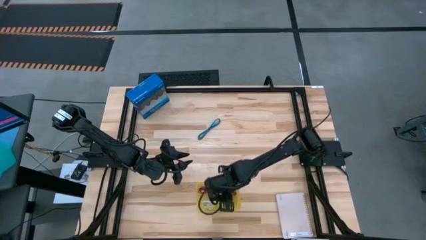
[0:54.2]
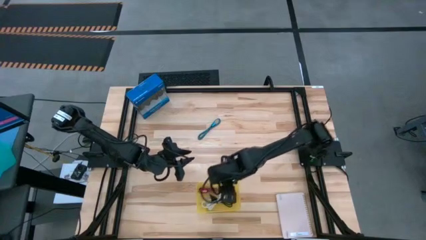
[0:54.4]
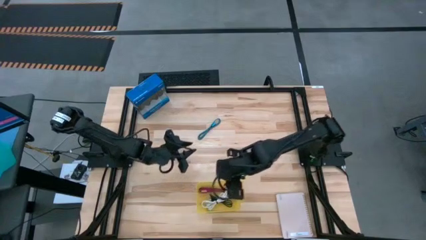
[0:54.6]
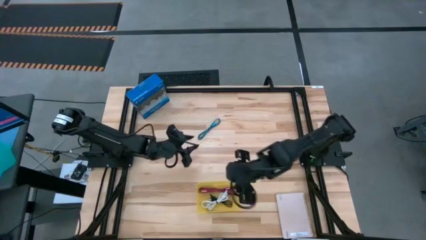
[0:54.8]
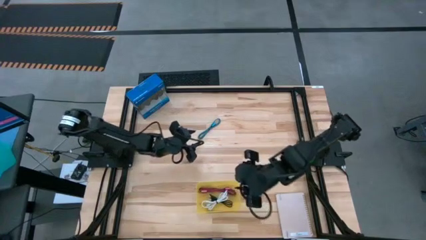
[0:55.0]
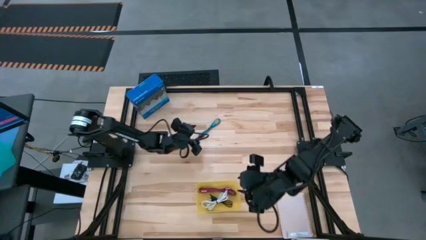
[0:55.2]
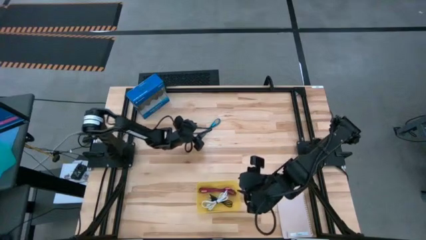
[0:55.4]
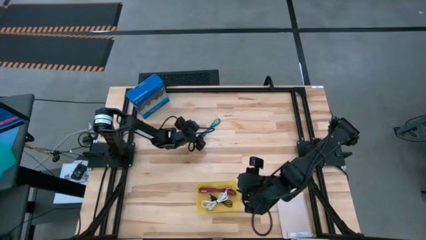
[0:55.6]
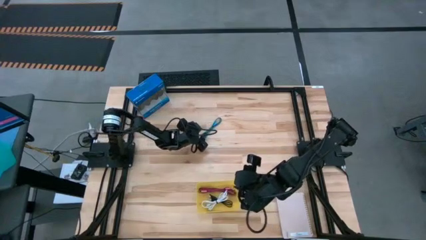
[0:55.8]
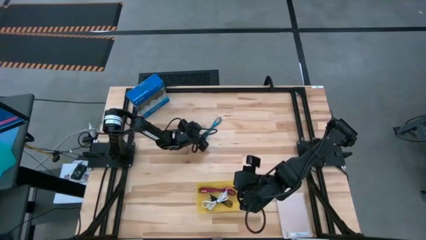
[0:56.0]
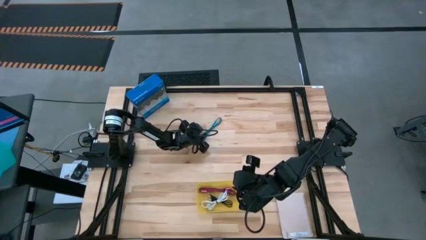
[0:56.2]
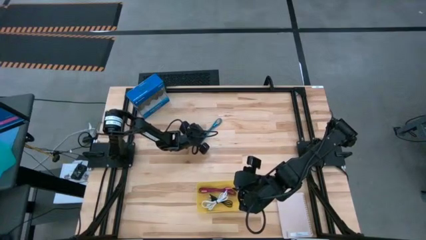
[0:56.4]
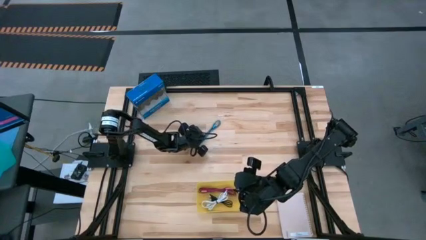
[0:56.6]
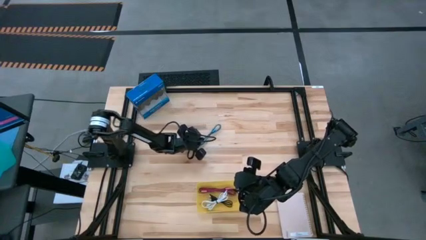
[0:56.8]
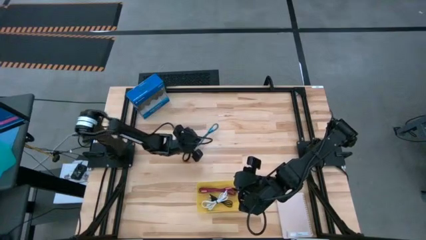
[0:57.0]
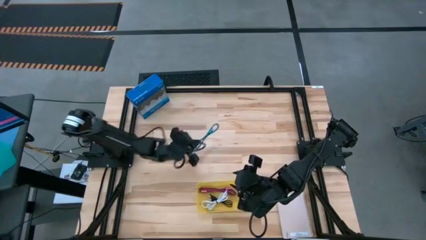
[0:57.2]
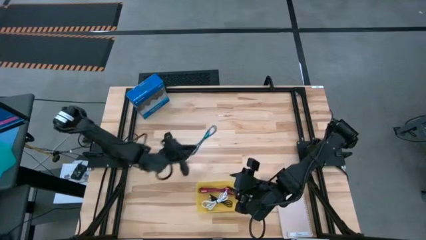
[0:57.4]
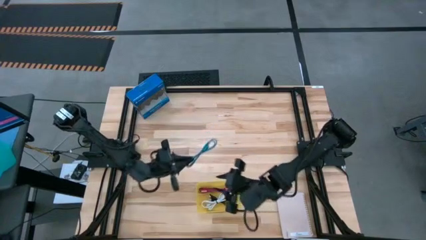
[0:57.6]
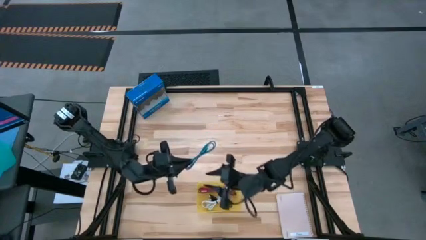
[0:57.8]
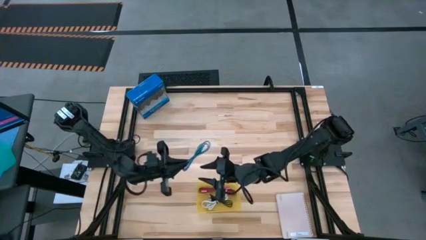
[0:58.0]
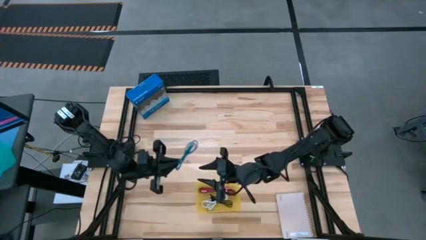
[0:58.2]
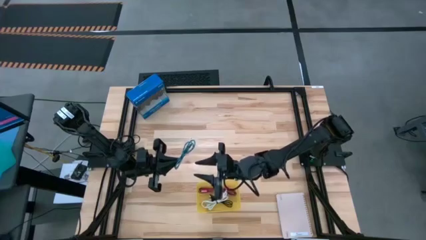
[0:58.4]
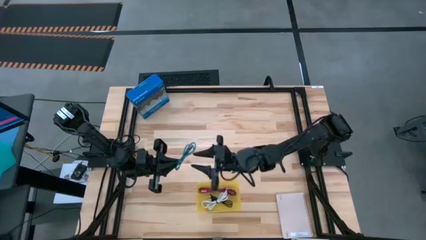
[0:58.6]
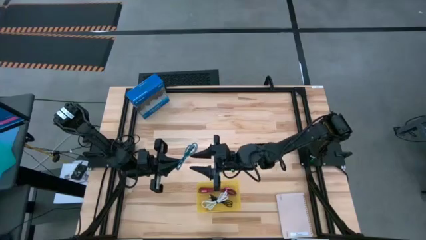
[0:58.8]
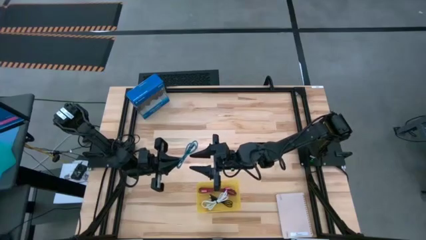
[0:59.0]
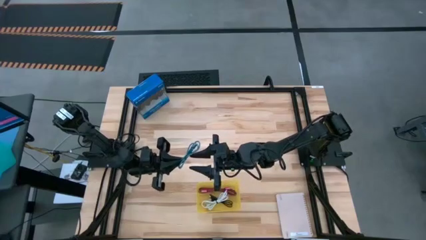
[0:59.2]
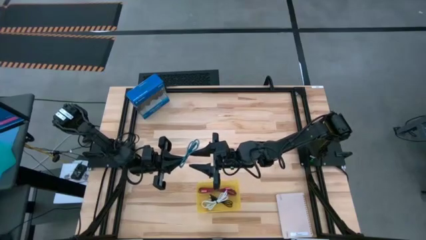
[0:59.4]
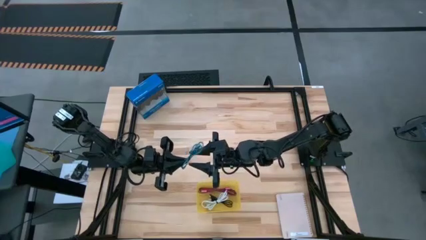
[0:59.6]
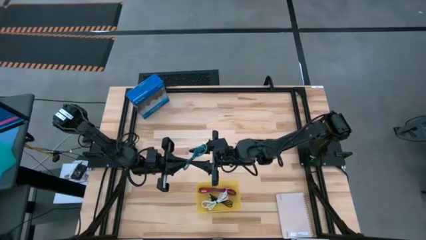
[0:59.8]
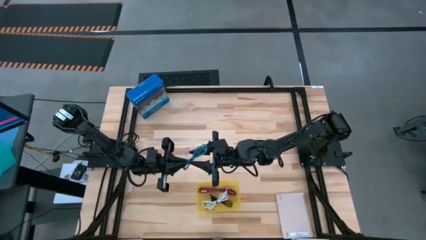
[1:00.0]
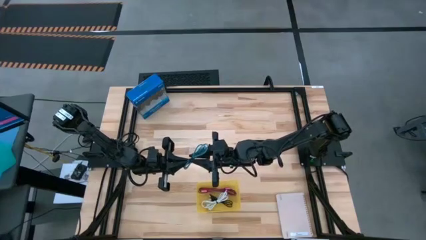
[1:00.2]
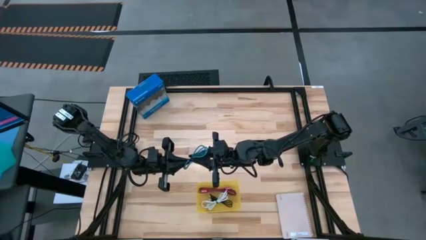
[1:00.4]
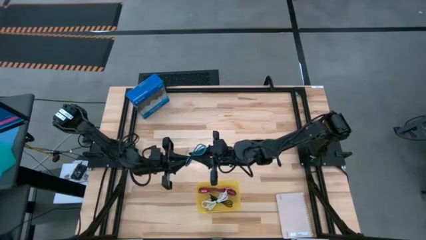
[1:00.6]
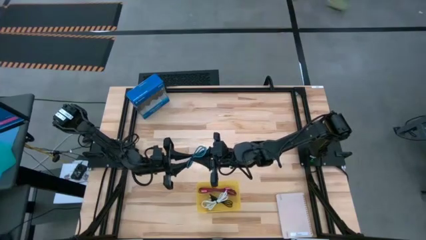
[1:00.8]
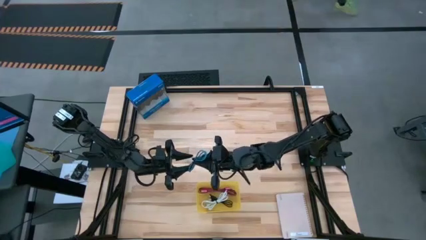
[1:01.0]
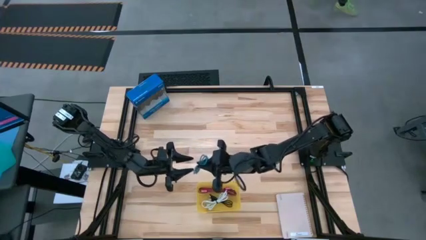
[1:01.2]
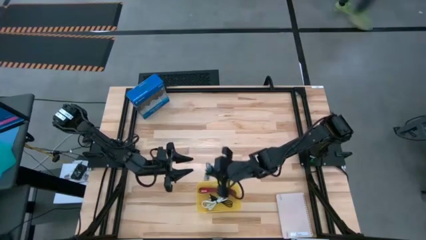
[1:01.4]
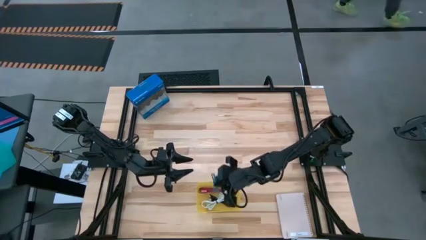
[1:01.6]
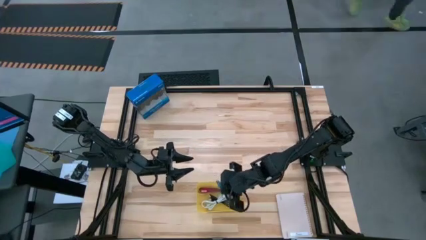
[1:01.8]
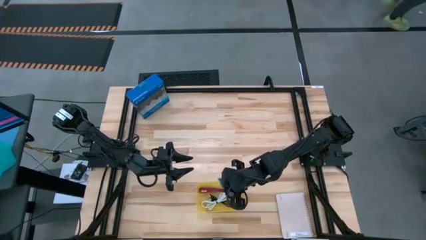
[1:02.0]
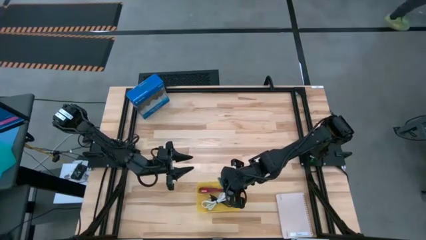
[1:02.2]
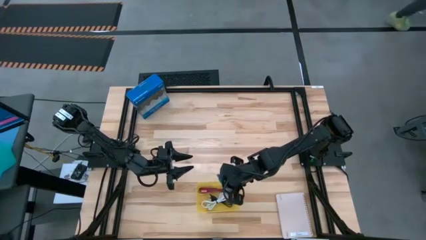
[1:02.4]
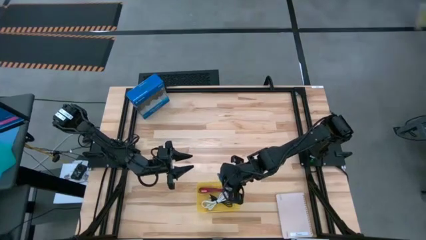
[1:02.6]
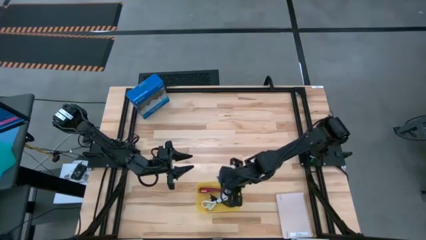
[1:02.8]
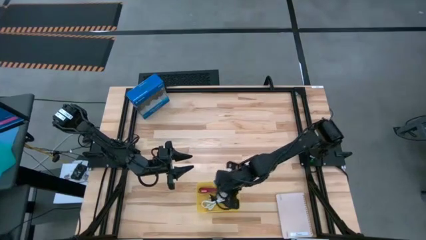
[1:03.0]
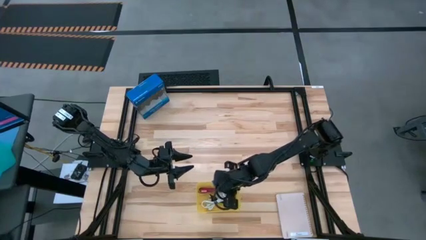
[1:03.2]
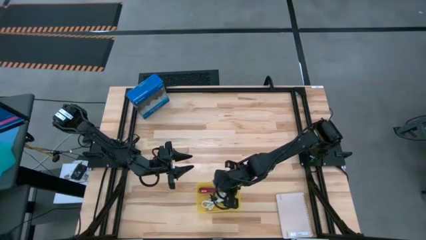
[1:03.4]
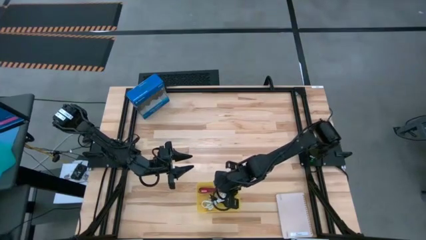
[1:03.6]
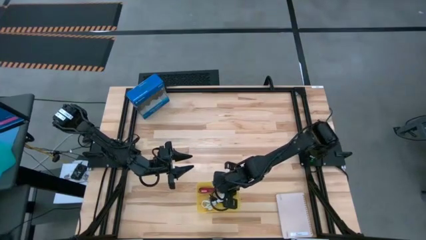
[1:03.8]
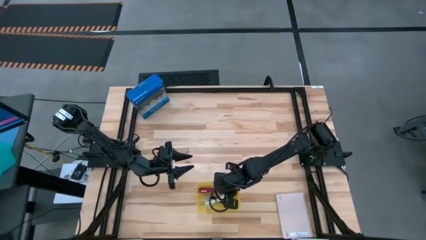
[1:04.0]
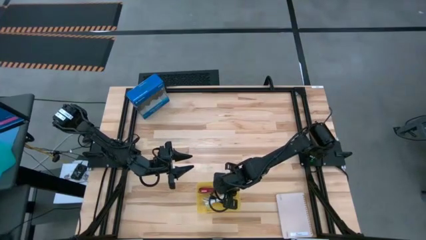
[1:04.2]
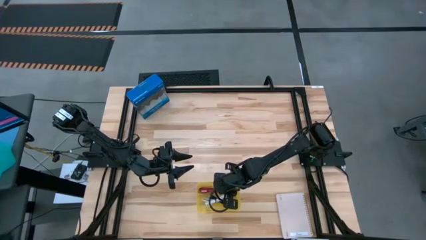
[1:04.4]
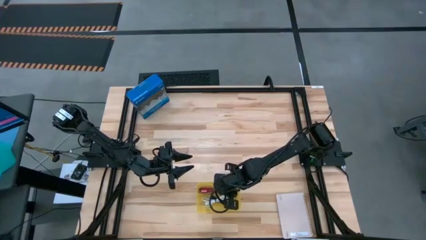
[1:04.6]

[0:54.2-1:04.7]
Task: Pick and place USB-C Cables
Put the blue charger cable into the yellow bin

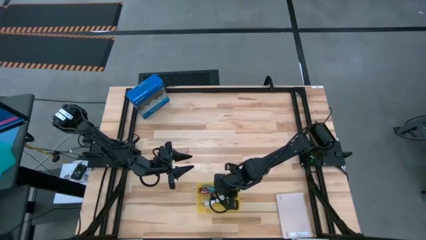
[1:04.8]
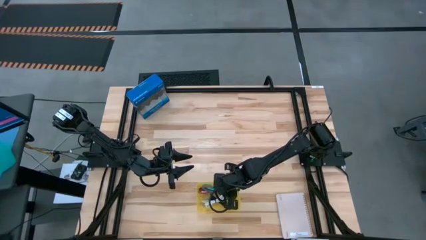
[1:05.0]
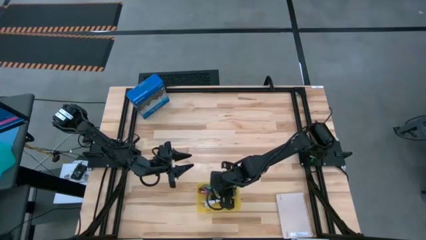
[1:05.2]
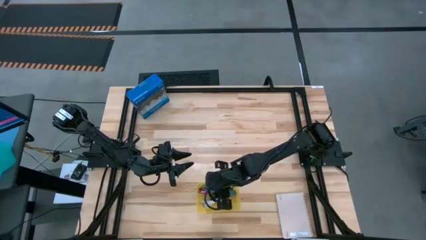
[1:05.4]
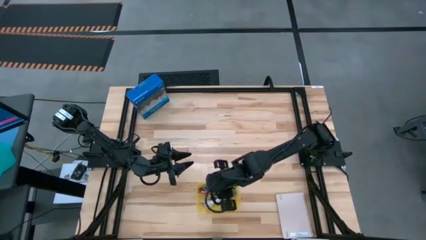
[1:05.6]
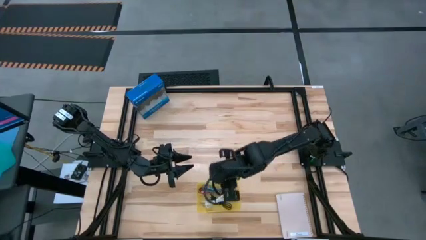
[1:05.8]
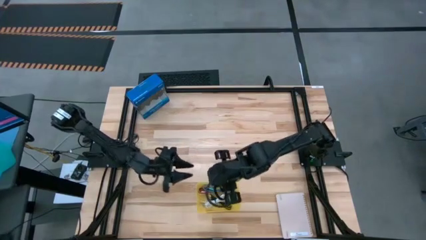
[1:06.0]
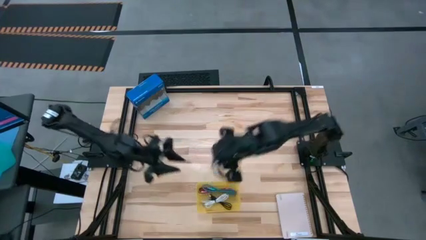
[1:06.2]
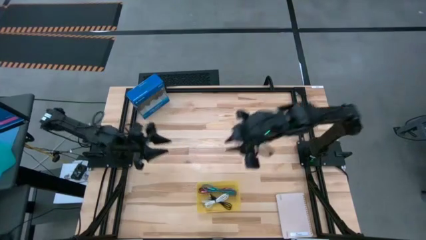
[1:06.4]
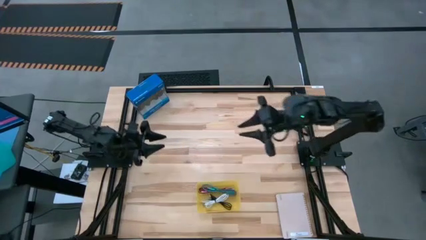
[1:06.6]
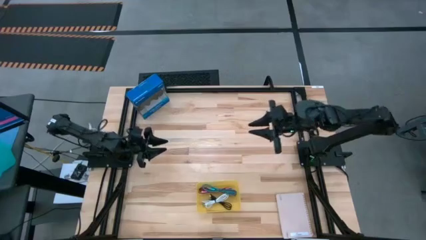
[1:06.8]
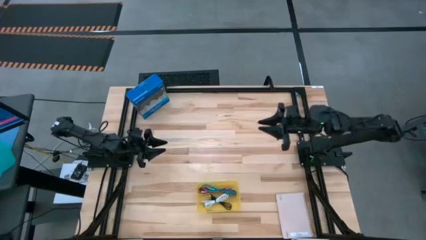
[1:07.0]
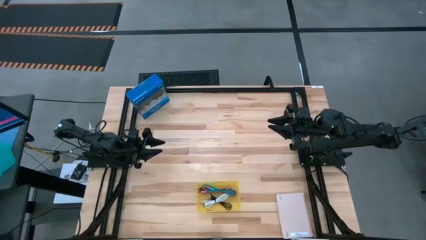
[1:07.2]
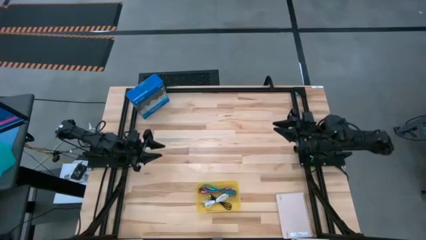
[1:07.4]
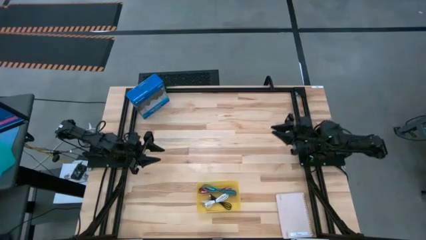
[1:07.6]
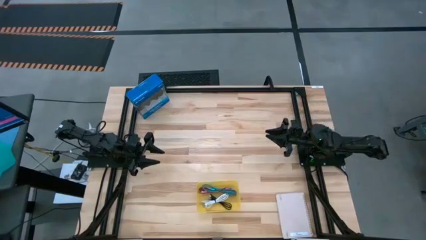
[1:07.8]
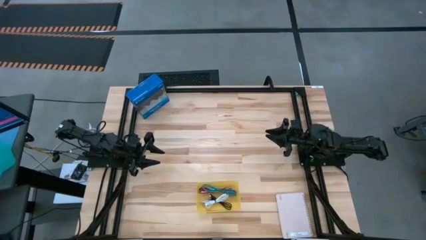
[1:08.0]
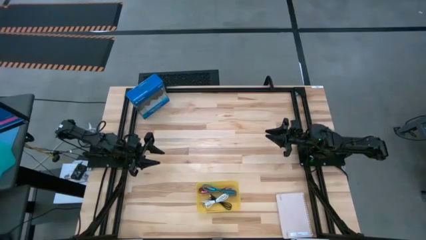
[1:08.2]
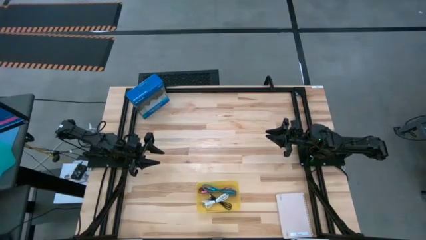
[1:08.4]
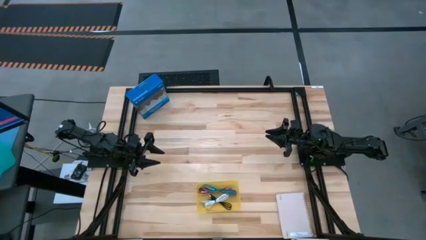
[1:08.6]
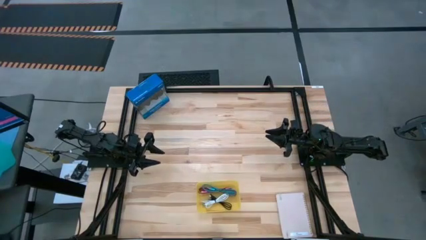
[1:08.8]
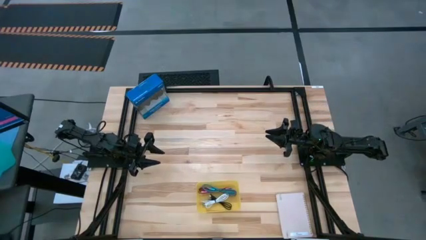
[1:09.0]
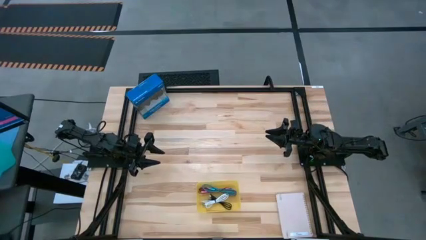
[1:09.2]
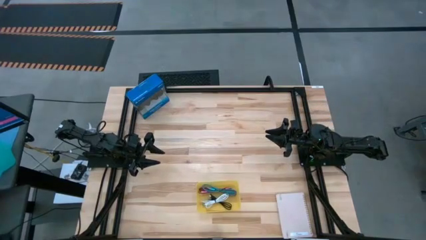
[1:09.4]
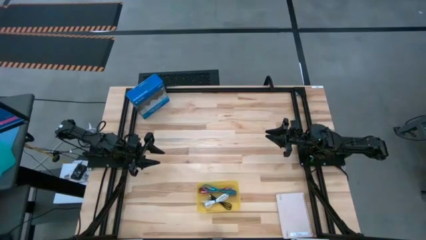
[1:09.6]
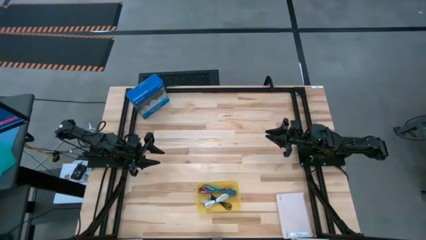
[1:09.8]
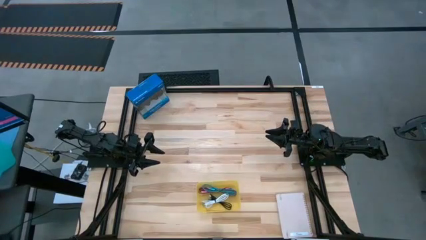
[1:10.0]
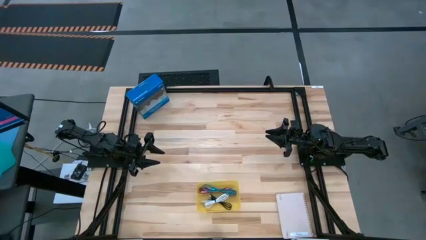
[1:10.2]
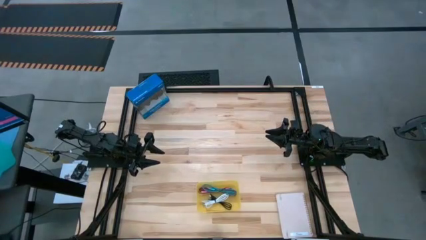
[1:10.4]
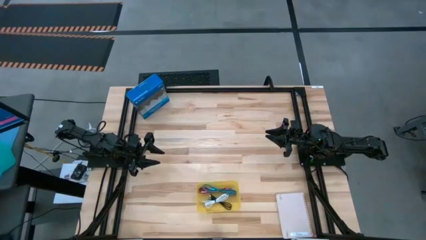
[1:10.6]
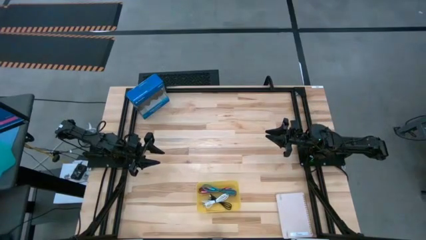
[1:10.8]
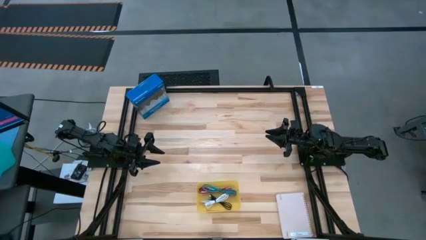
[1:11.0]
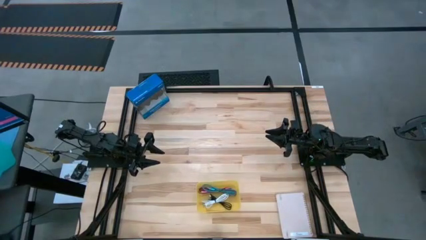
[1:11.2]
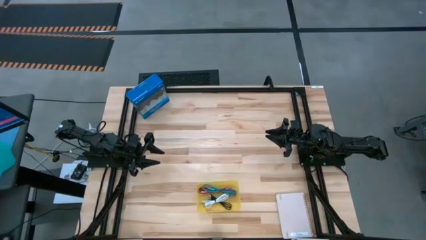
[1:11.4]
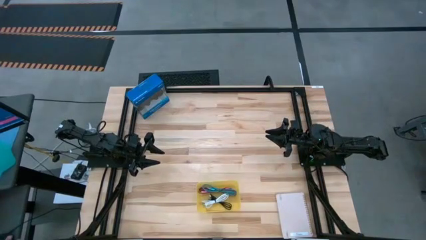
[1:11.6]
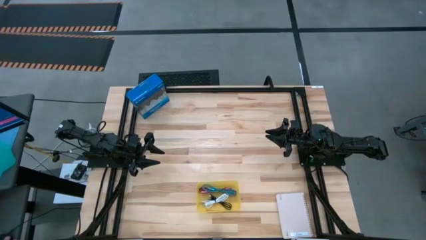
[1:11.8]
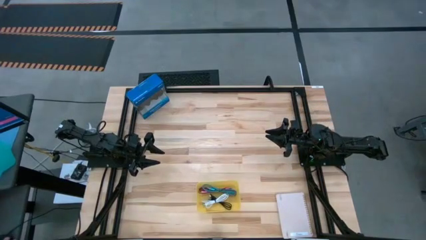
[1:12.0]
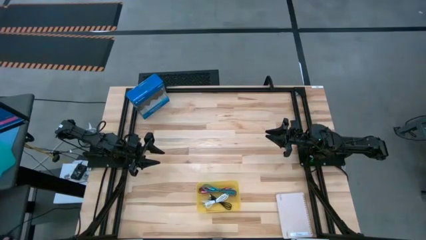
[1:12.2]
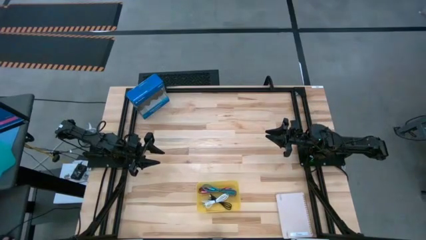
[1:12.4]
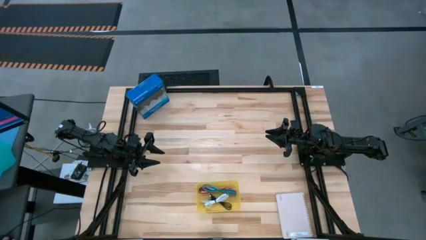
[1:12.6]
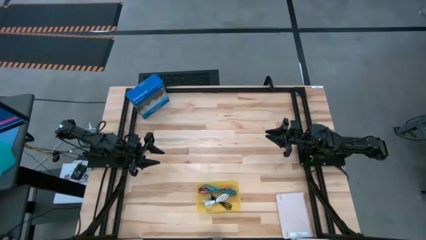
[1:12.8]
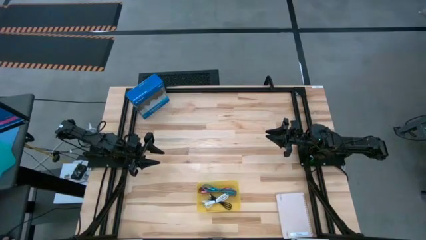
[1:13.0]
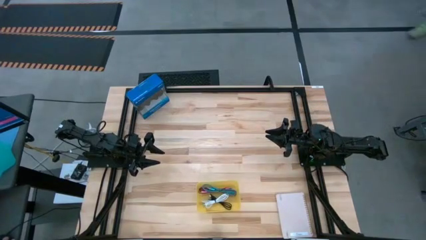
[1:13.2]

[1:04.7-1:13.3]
Return to Home Position
